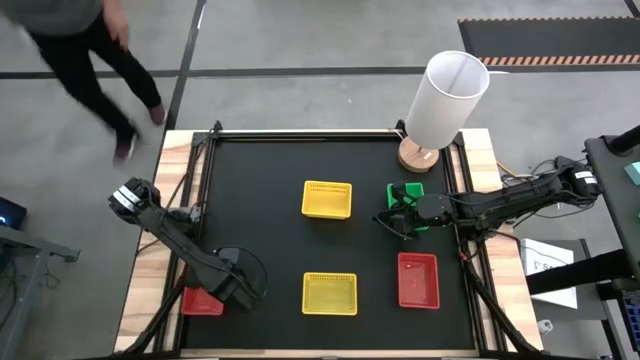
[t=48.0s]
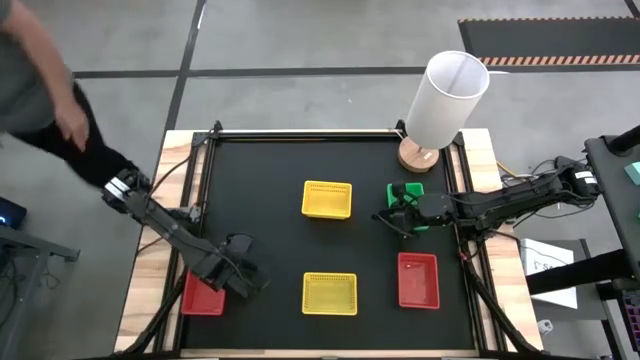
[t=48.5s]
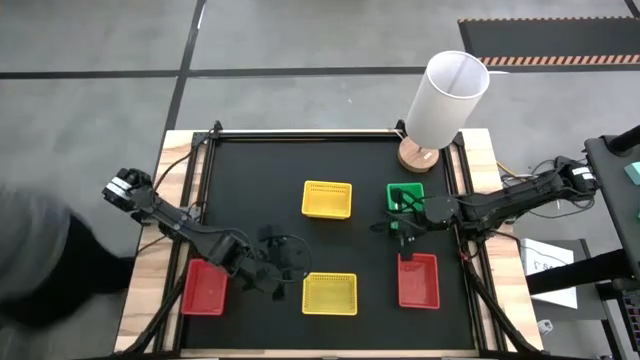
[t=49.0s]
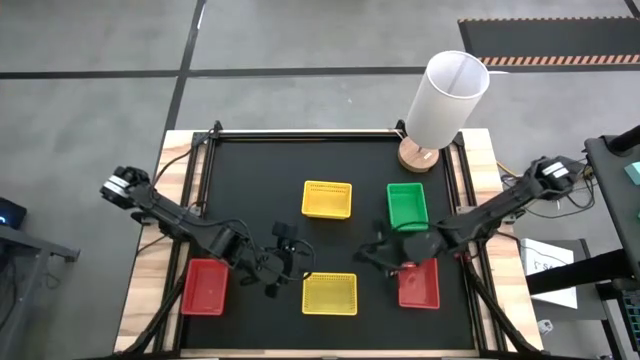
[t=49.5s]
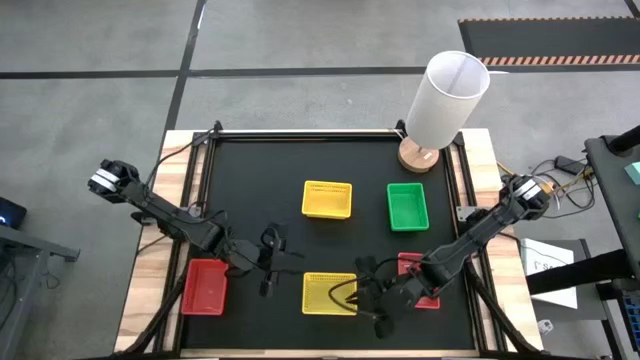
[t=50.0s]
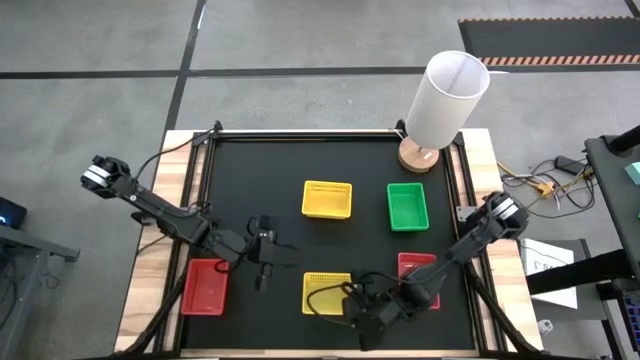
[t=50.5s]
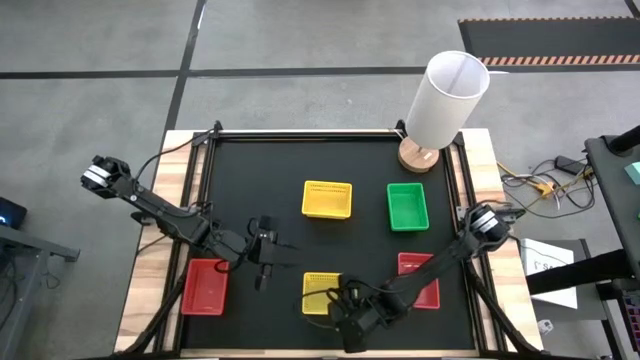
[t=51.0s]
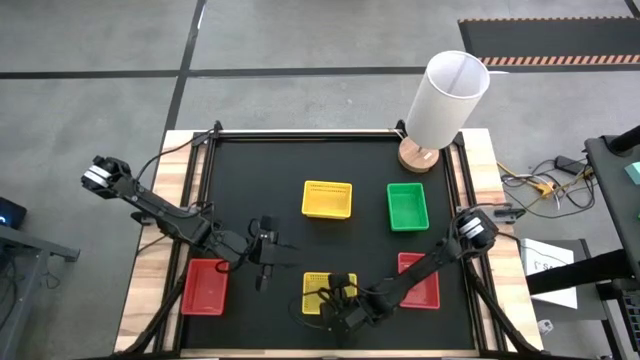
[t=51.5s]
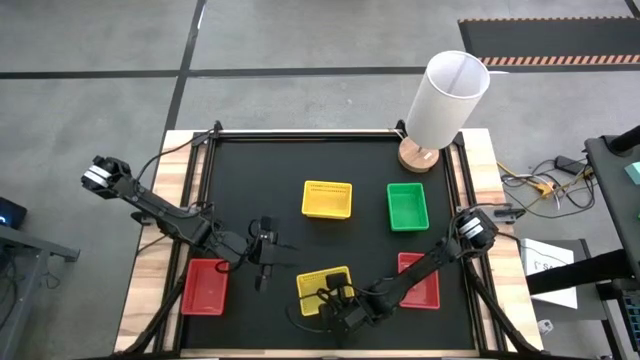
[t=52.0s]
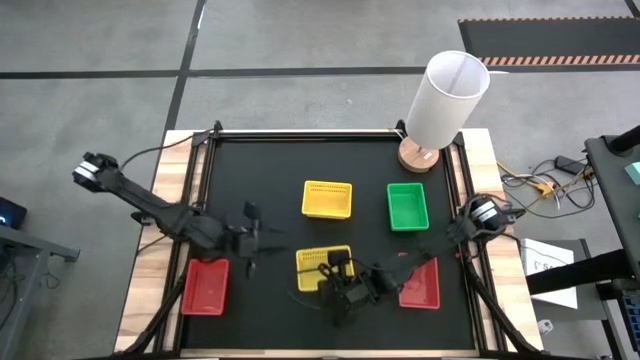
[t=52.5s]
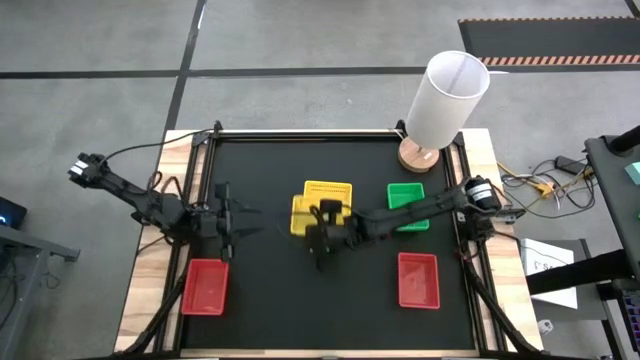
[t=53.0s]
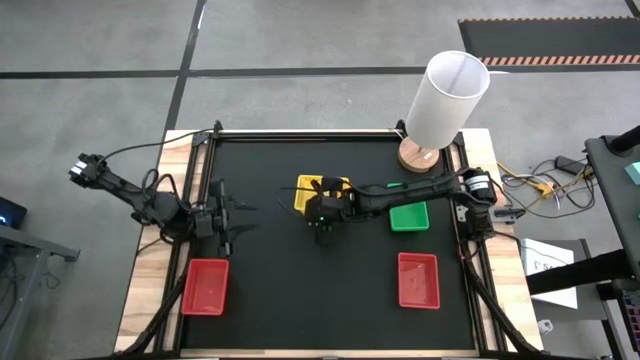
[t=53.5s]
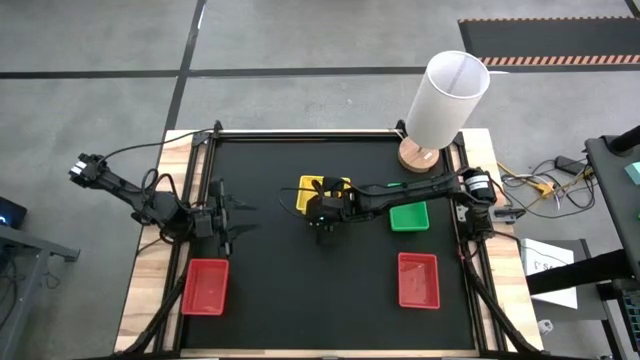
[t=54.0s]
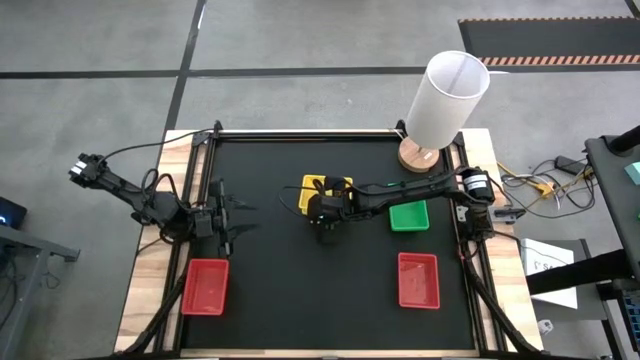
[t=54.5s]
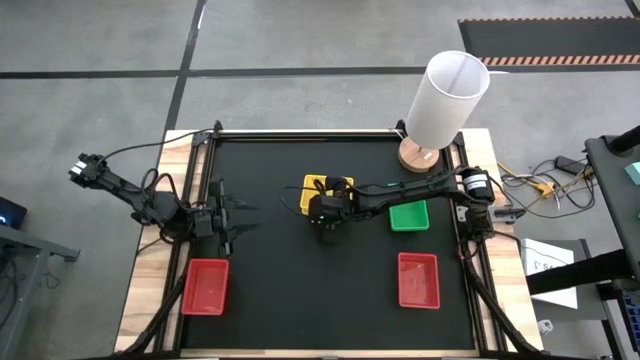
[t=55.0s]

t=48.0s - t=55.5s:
Stack the yellow bin on top of the top yellow bin

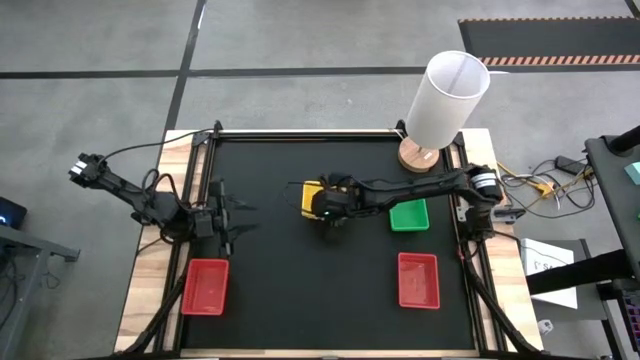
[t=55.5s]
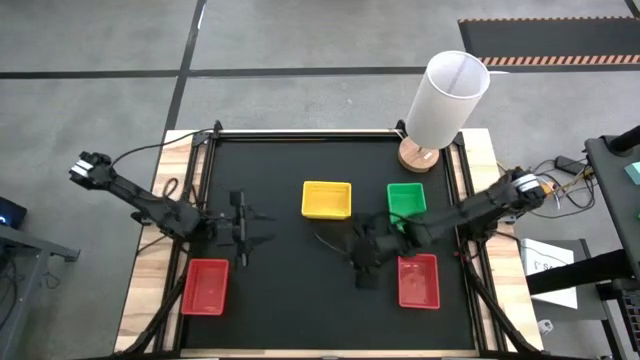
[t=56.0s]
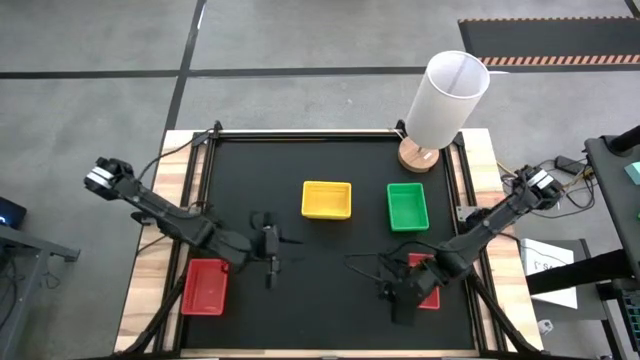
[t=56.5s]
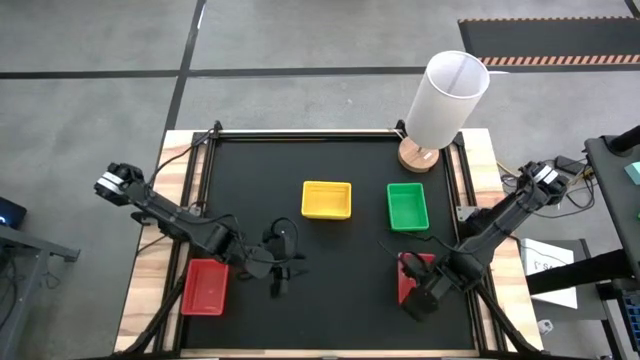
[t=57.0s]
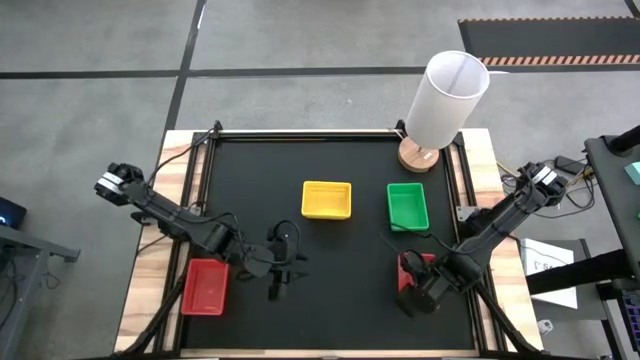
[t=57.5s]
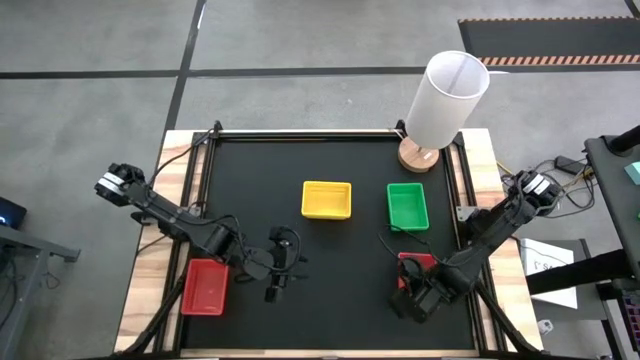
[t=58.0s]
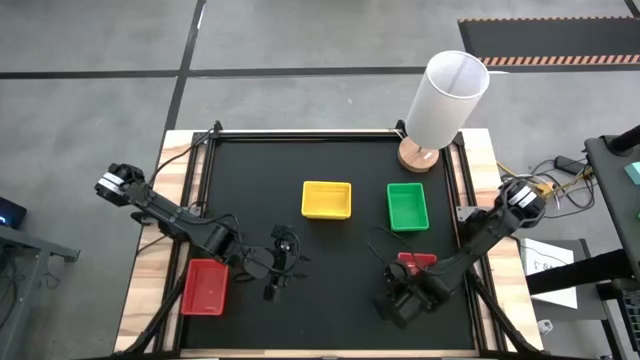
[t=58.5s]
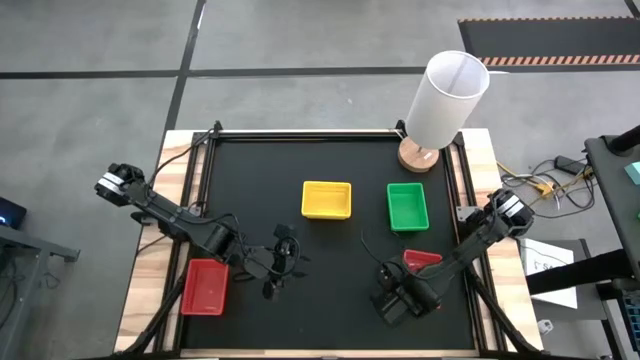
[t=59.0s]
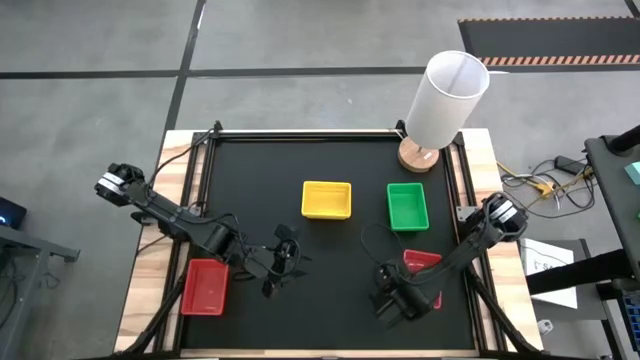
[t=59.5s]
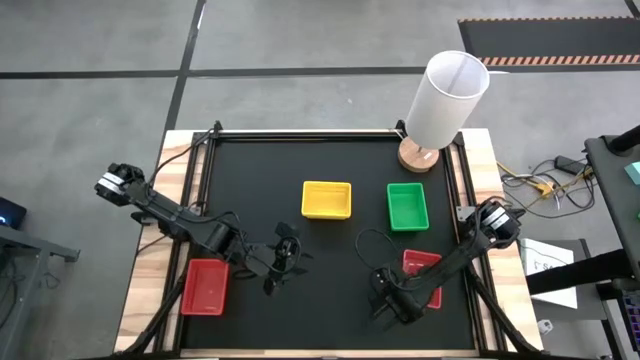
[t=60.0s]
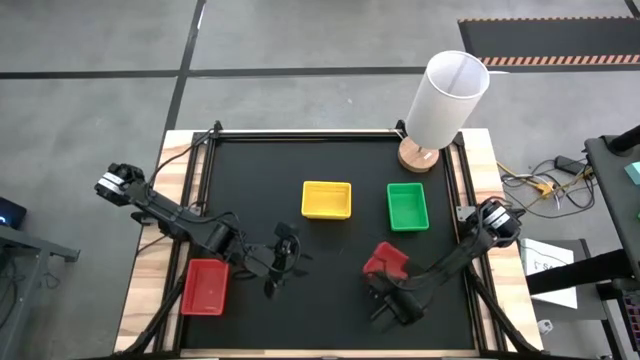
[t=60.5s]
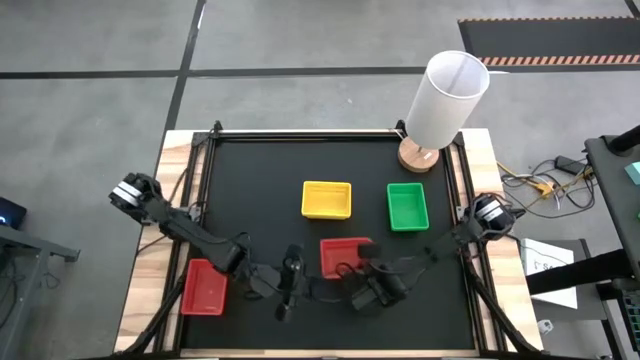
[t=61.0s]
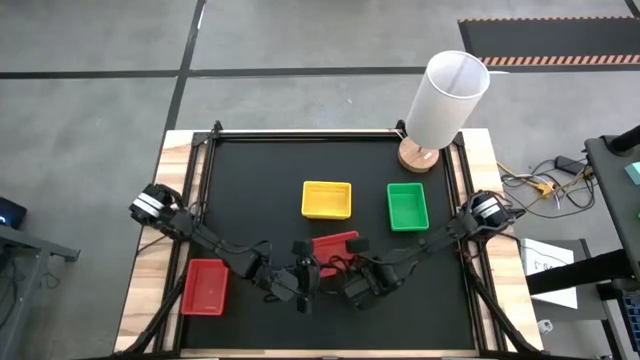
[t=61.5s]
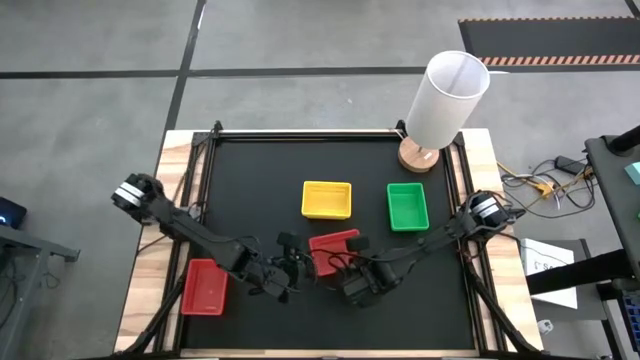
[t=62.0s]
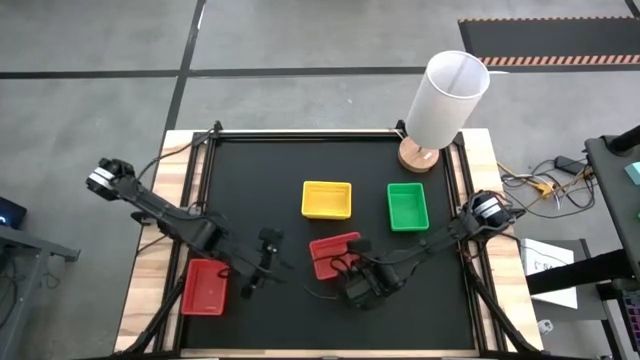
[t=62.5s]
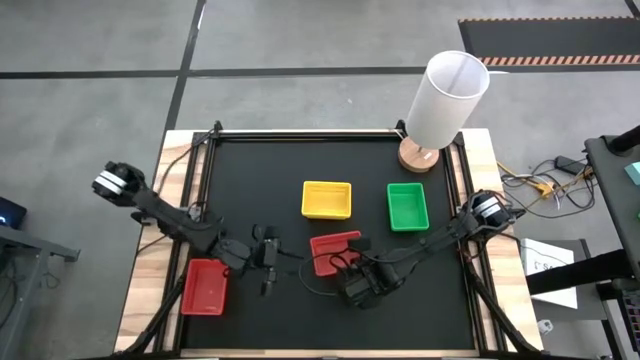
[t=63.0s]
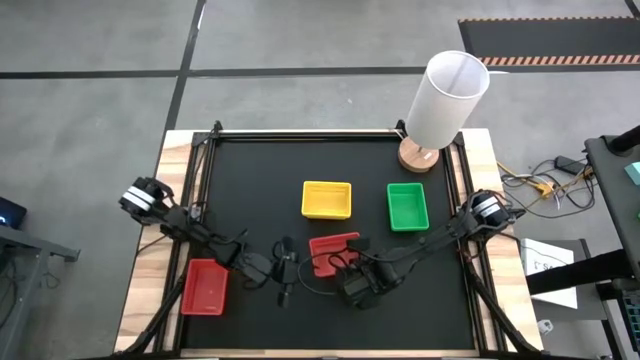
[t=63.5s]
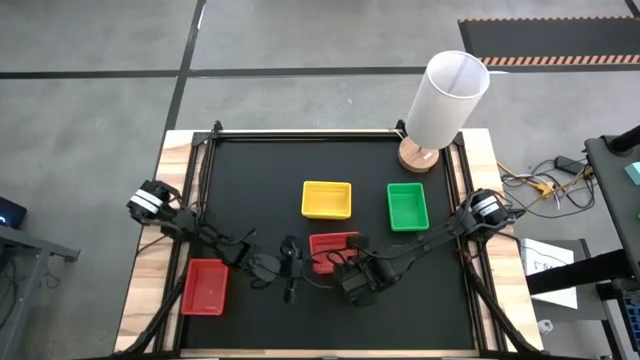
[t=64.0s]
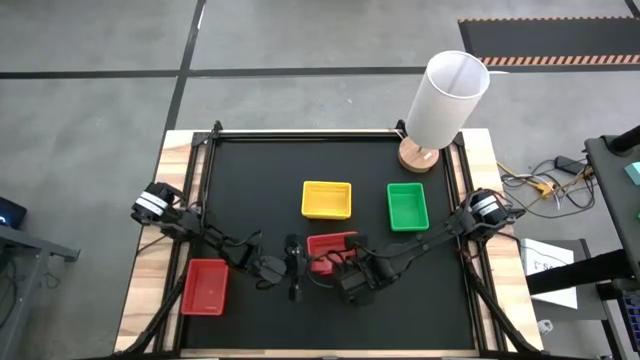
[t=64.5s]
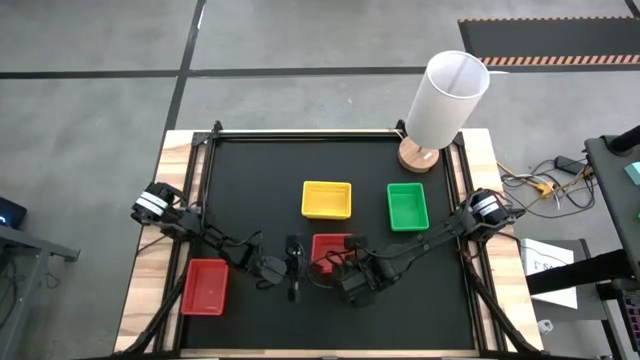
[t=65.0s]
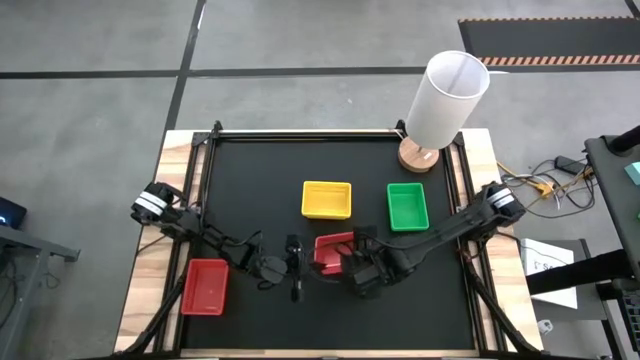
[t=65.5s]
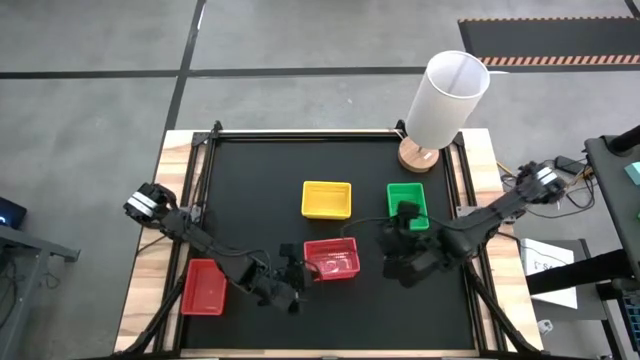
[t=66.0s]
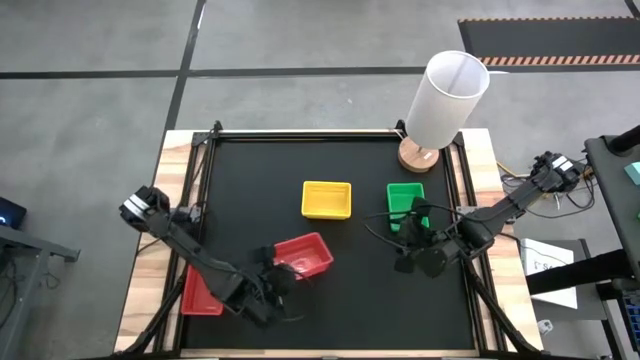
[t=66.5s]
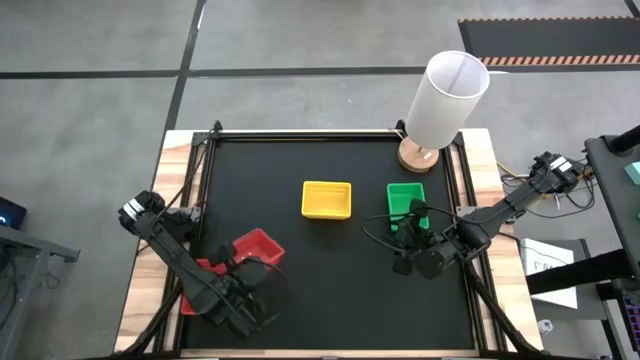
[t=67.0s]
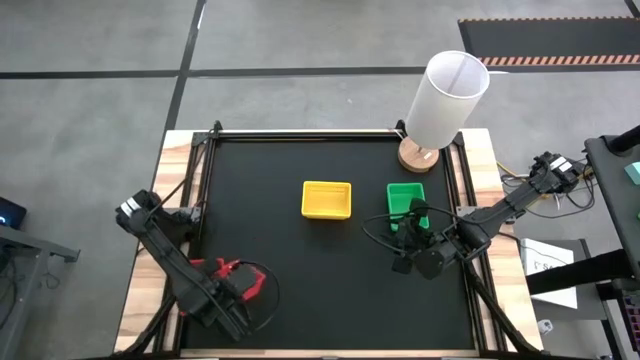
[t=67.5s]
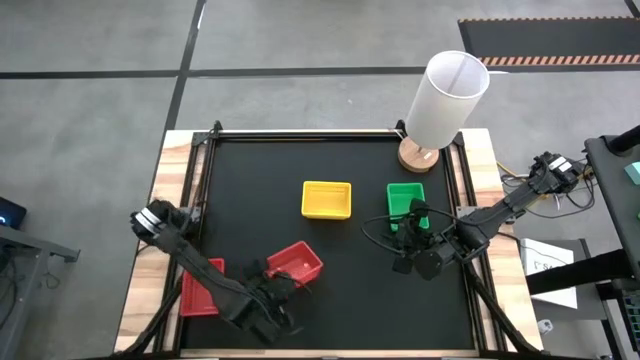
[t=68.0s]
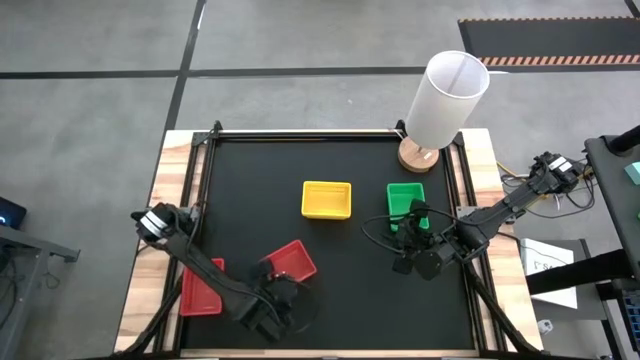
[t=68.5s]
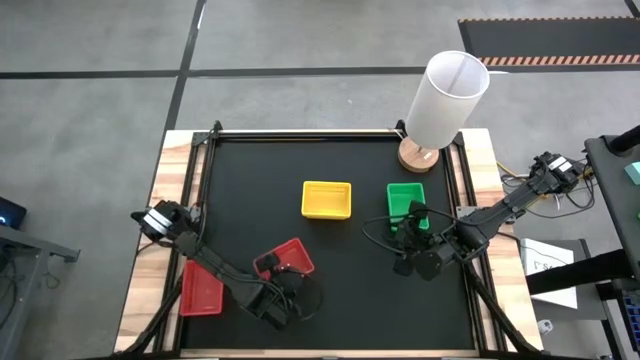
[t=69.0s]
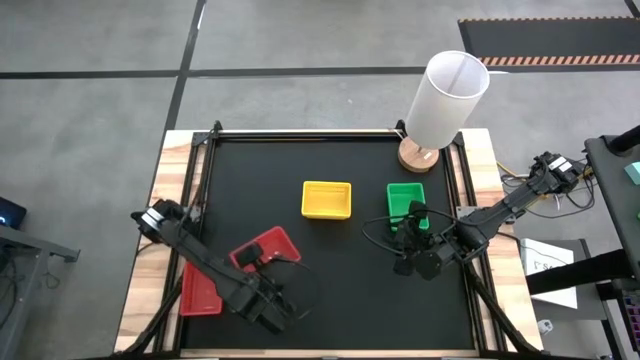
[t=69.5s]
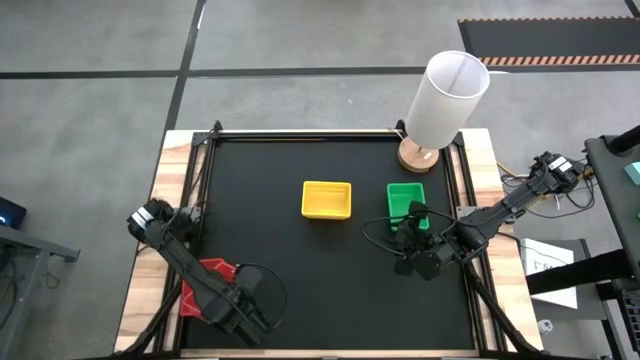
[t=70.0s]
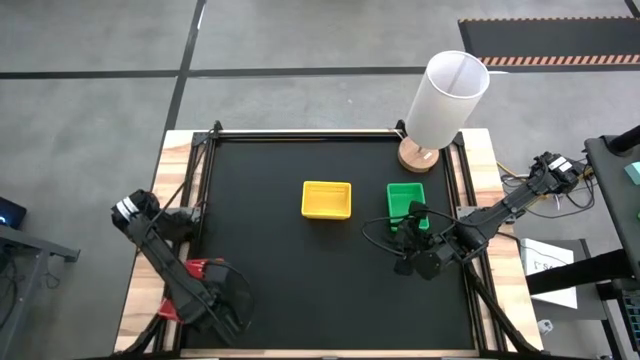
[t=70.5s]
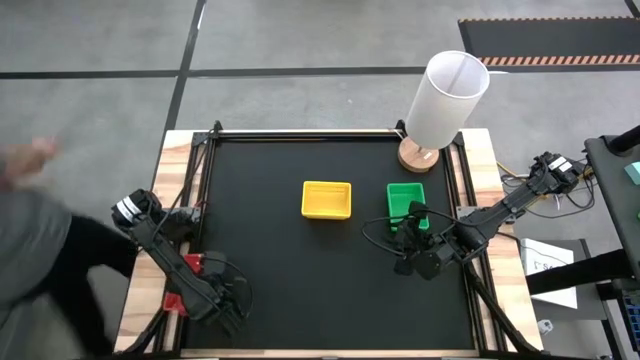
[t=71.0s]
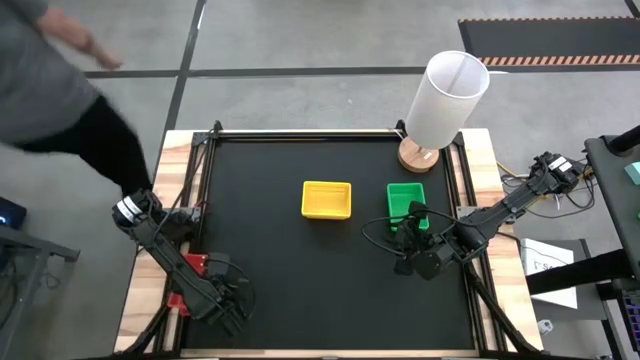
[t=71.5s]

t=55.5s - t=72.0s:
Stack the red bin on top of the left red bin
